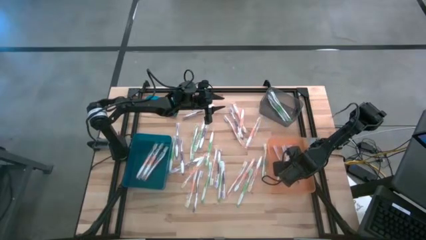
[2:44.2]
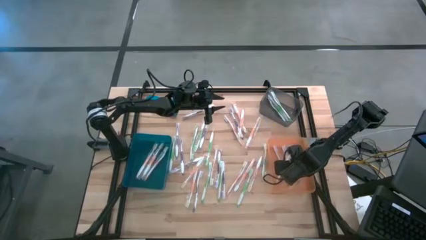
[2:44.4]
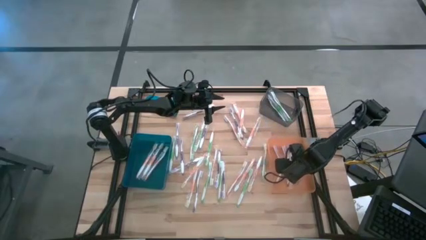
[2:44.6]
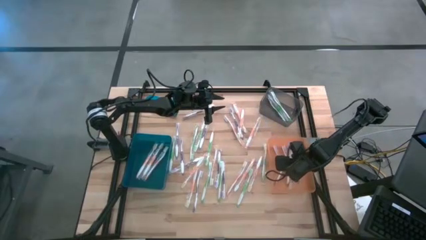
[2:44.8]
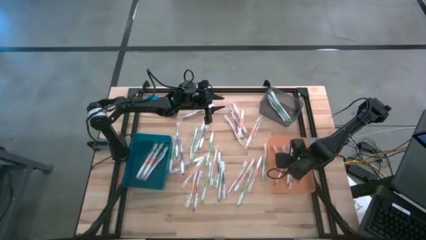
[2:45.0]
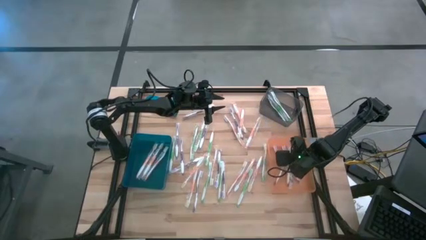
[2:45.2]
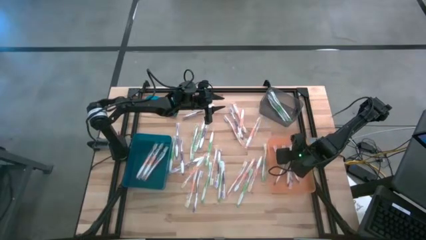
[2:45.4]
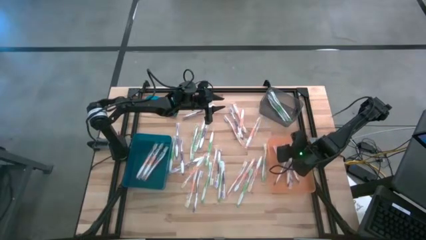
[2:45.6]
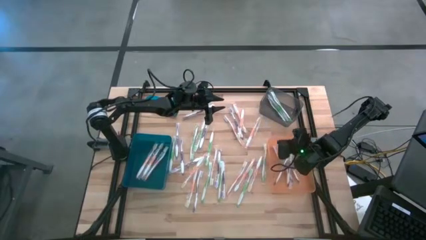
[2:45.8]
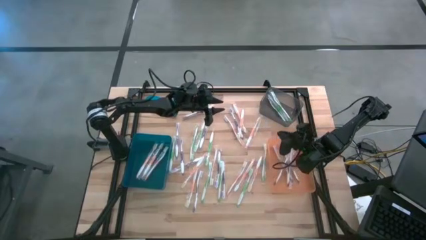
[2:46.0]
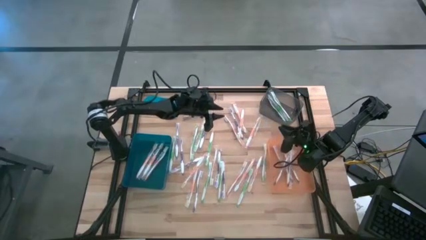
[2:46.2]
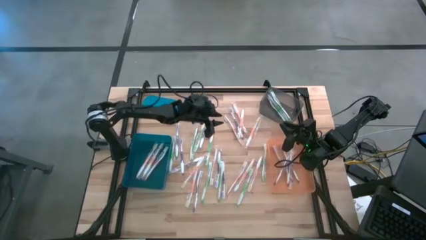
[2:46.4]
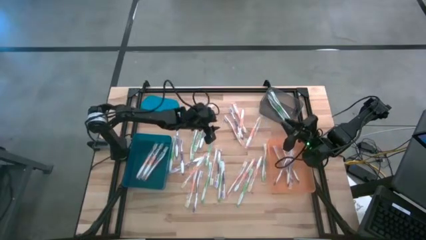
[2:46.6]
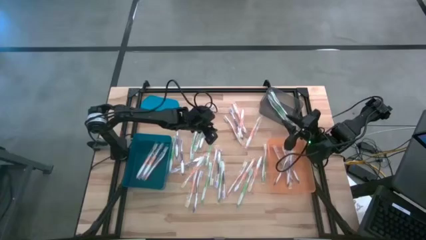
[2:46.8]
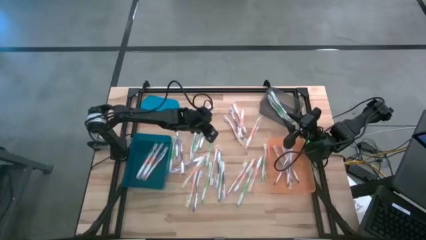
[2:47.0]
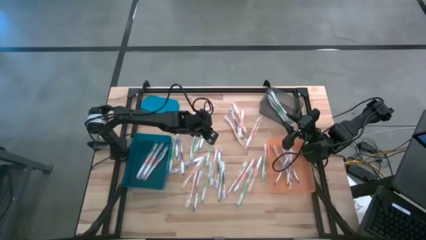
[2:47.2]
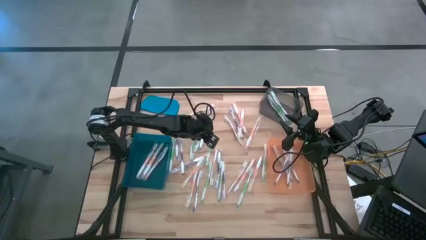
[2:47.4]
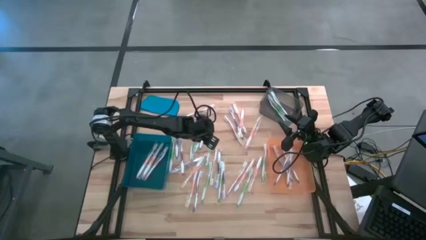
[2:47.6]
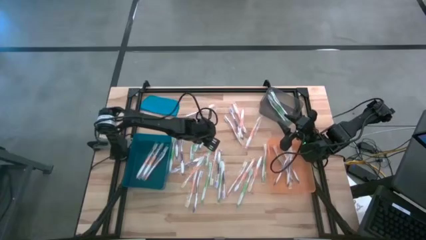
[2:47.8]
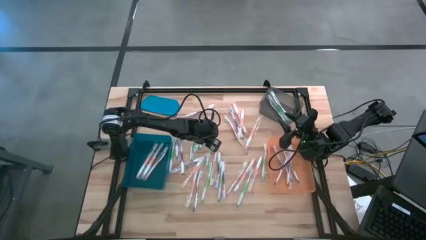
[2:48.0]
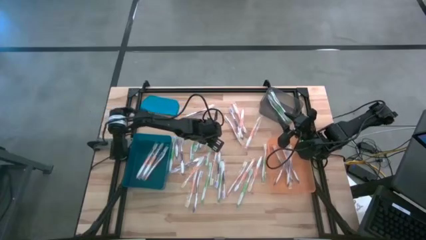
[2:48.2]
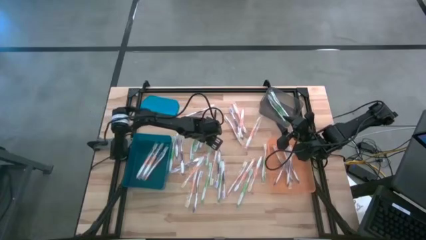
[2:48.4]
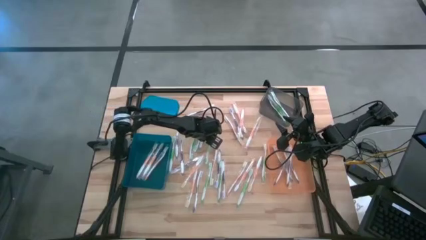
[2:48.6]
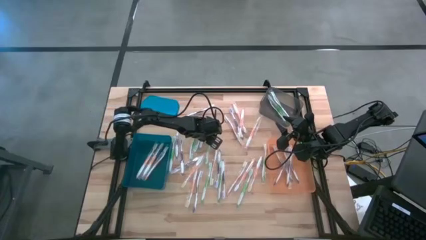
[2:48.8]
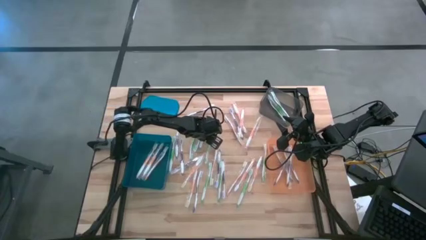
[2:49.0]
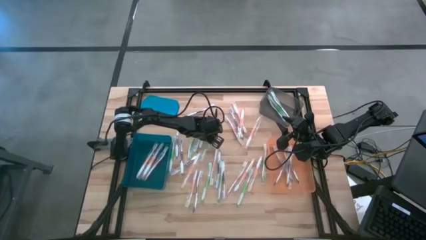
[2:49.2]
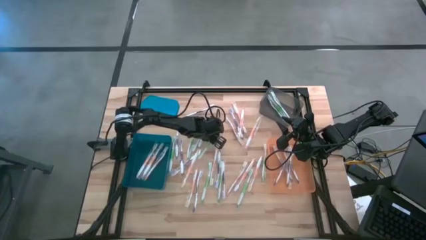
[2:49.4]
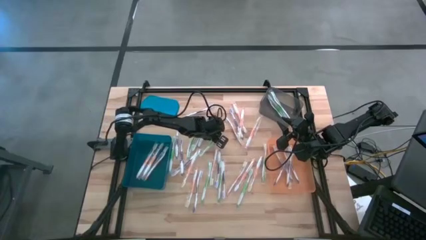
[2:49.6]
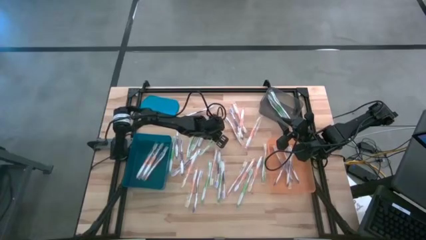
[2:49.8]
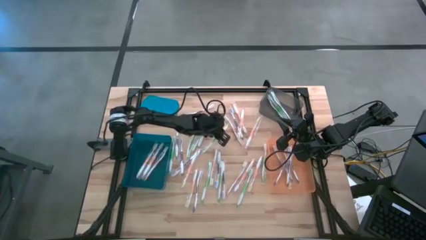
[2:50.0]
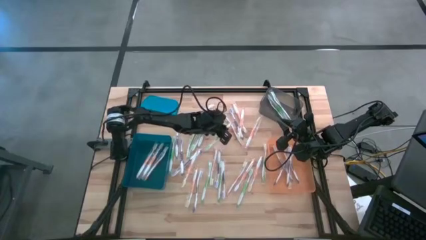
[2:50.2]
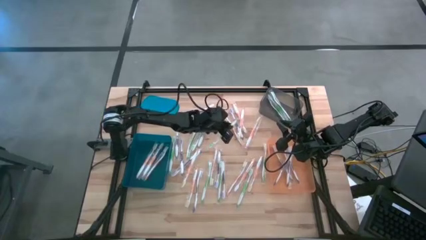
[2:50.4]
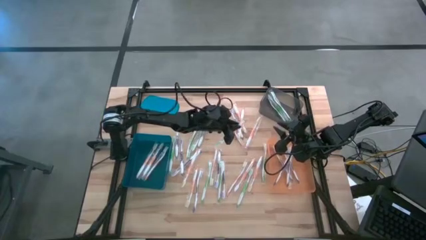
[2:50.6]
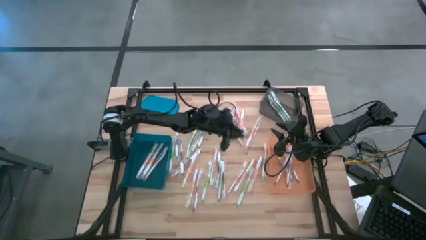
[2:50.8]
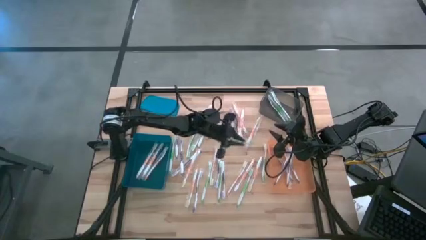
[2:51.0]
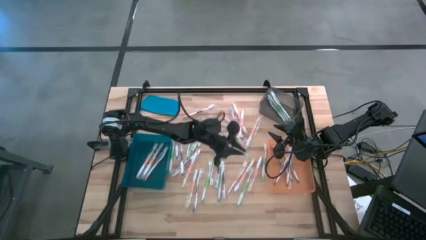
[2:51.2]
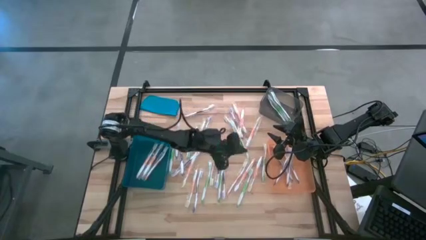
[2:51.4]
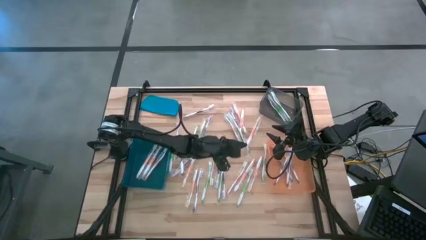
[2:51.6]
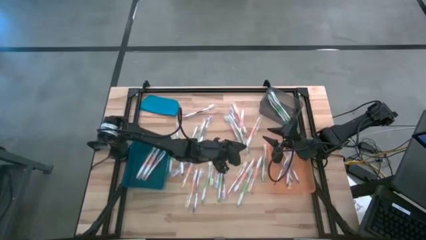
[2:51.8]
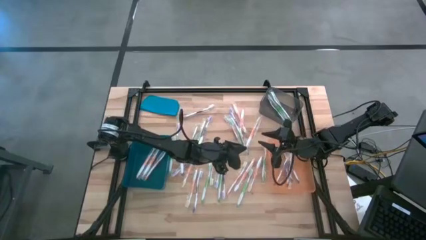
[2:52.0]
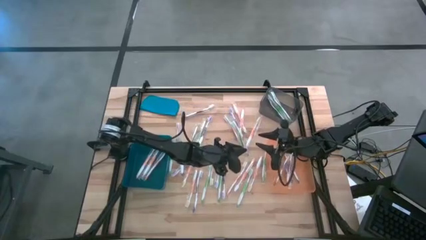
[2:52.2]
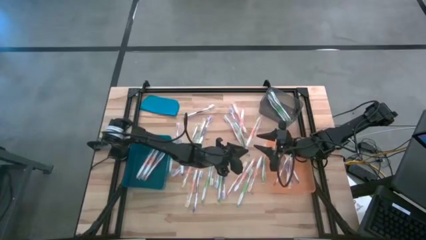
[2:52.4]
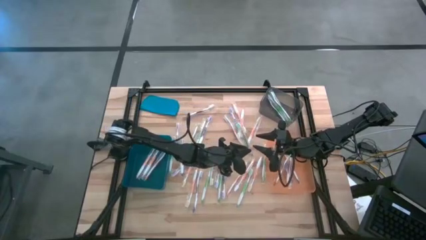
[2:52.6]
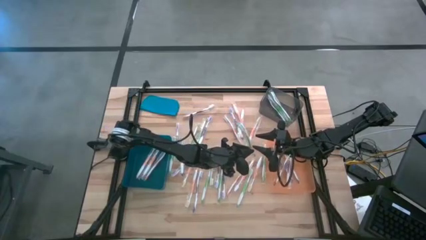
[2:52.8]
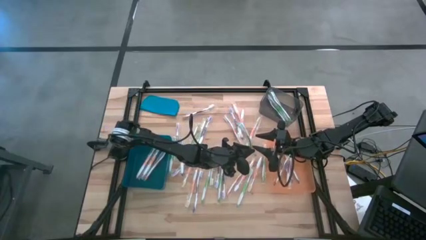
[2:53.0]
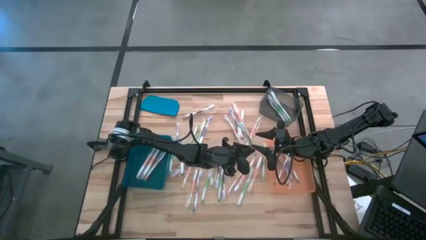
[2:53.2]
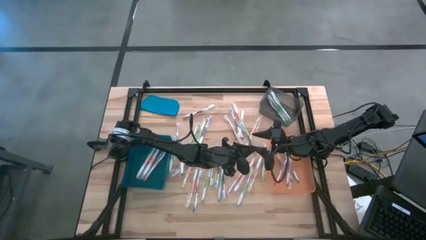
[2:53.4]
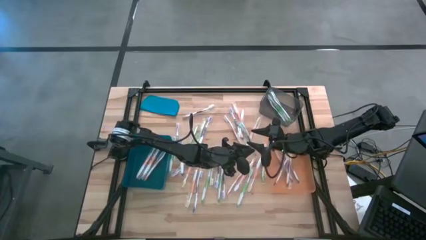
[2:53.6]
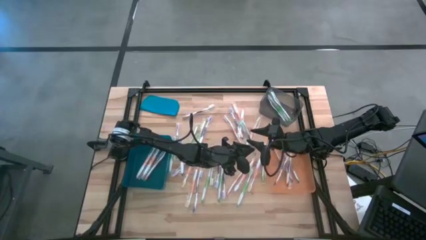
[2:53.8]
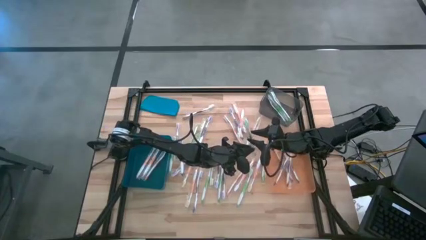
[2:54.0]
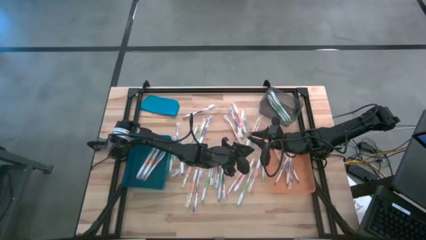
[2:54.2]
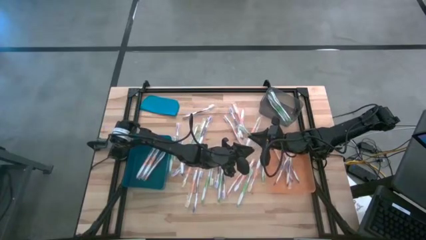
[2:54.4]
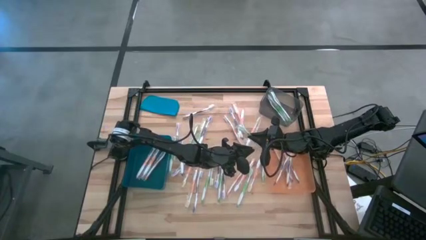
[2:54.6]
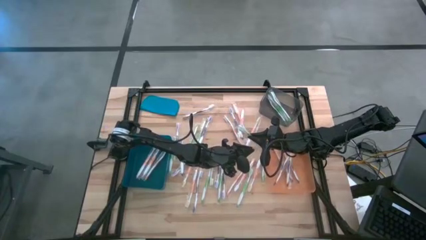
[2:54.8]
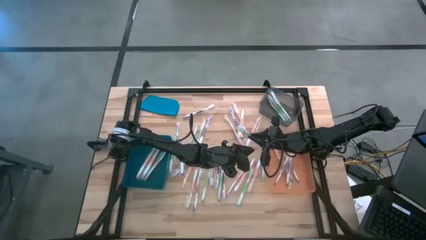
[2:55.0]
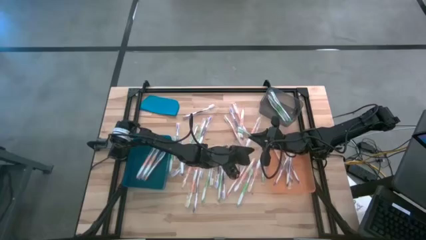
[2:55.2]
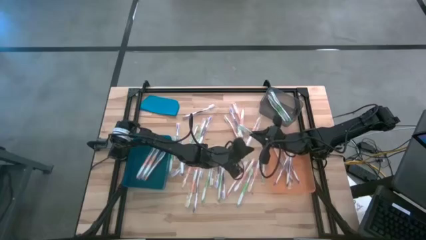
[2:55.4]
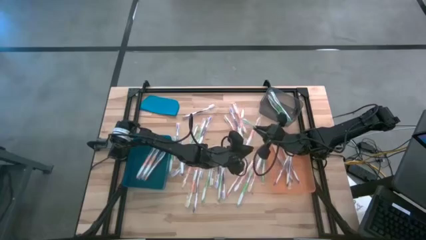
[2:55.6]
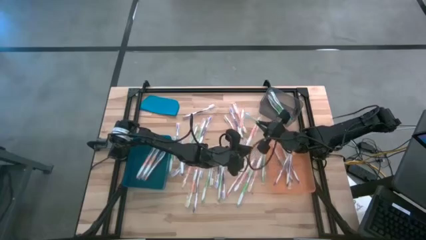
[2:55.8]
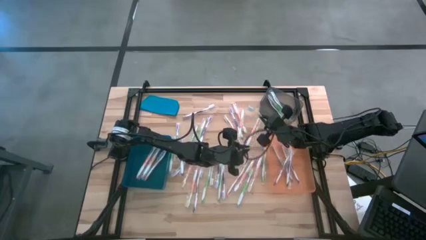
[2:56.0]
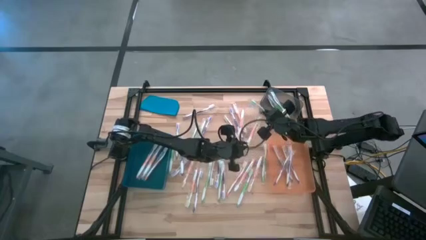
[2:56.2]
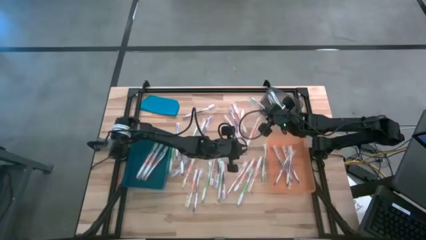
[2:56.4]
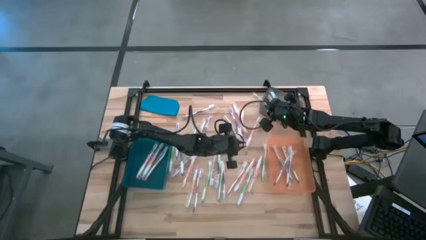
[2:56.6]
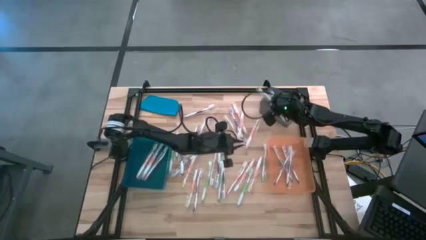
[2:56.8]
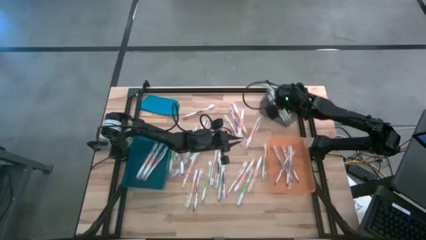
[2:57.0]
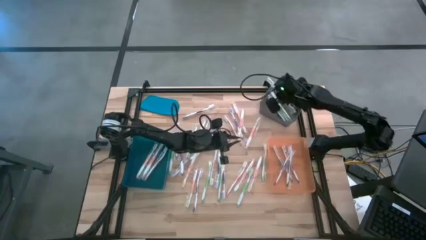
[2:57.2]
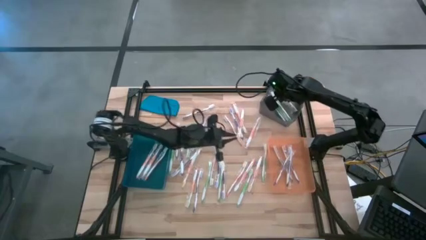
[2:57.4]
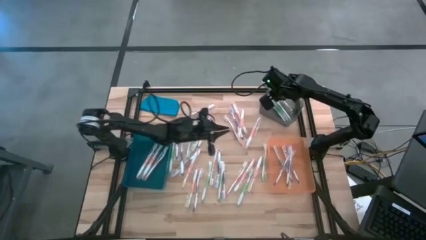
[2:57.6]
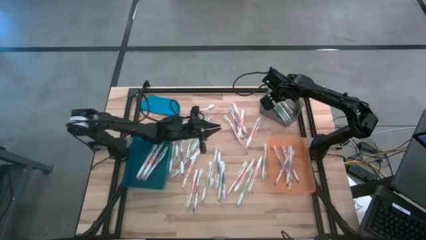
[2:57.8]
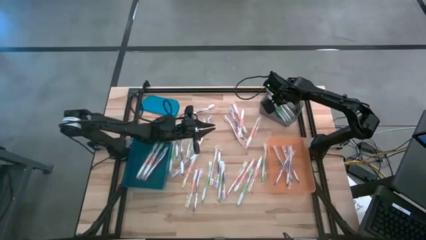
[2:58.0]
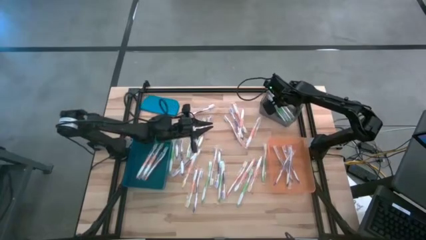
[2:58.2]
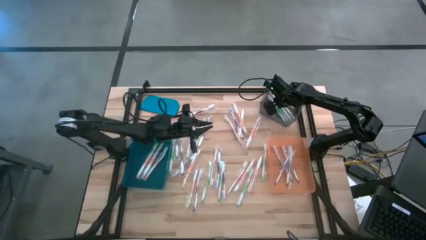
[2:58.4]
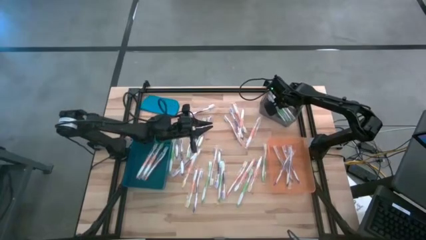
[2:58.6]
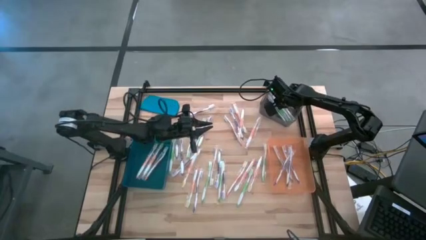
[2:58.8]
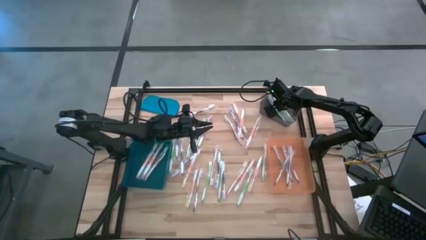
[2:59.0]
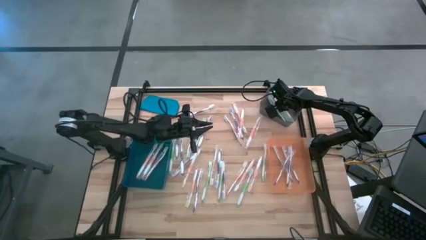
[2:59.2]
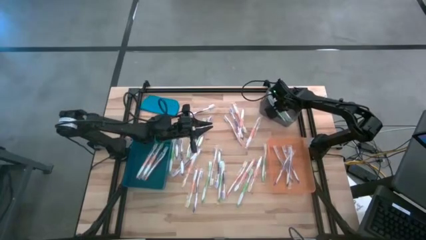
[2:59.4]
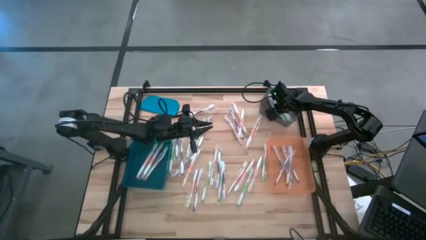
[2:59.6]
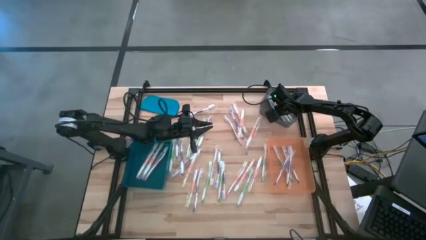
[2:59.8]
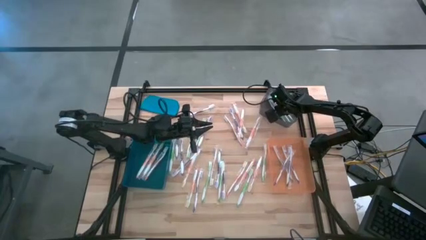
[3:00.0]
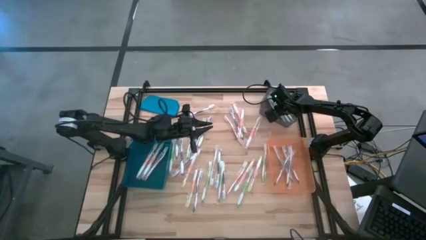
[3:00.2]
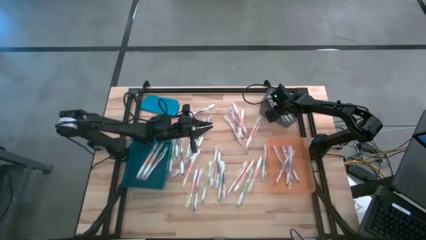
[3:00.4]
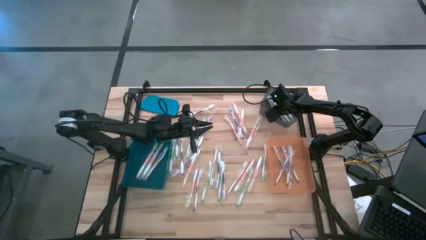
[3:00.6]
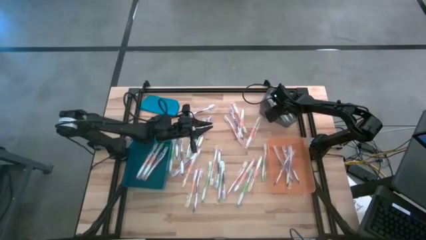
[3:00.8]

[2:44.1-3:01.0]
Task: Pick & Place Toothbrushes
Put the green toothbrush into the black bin
